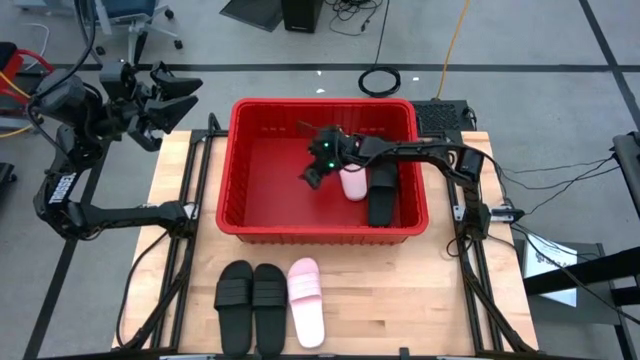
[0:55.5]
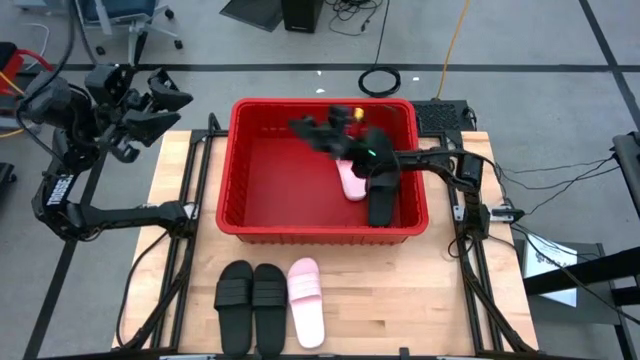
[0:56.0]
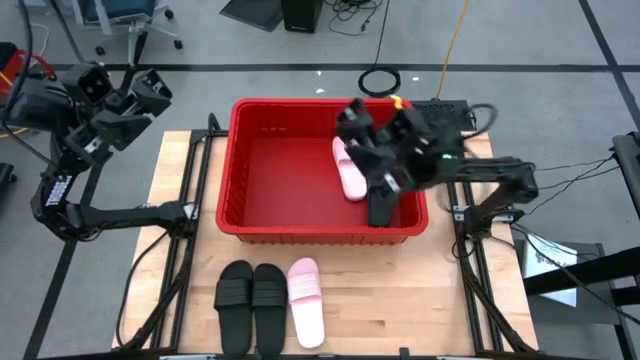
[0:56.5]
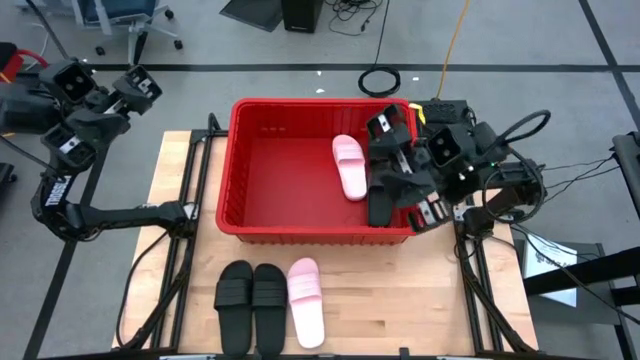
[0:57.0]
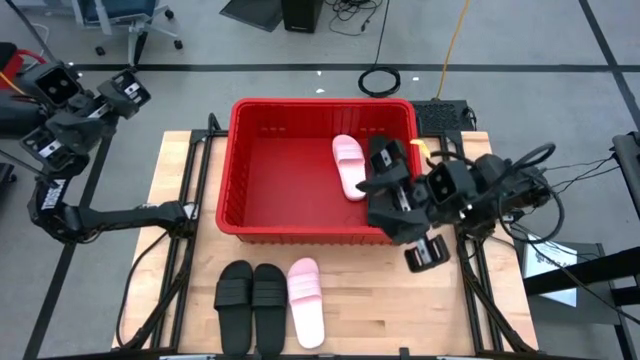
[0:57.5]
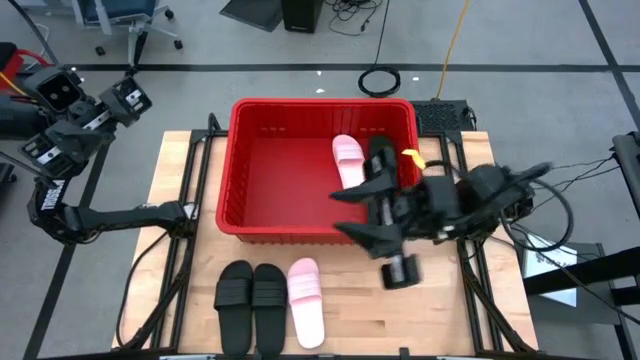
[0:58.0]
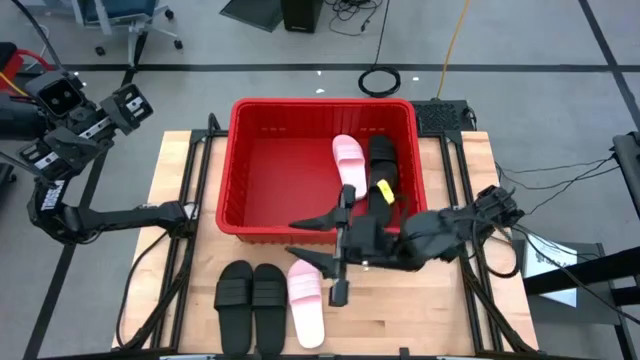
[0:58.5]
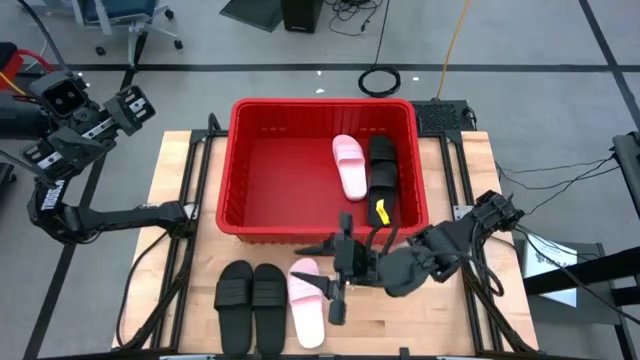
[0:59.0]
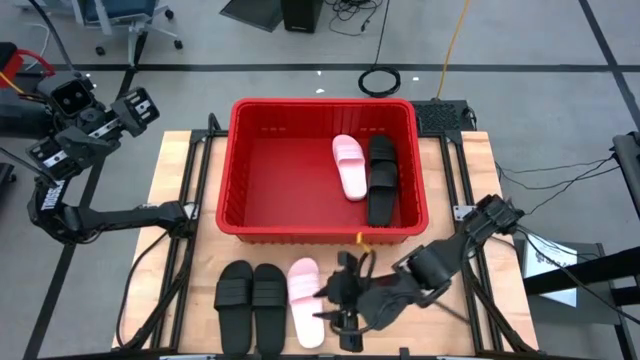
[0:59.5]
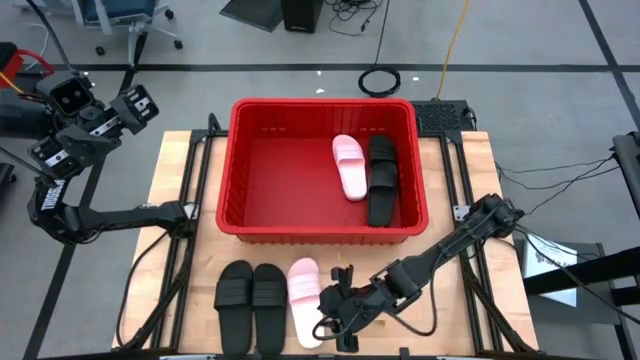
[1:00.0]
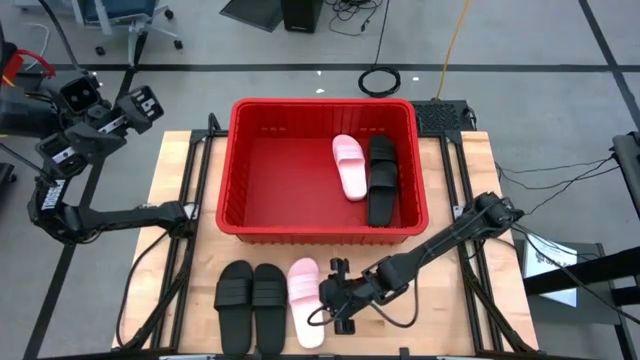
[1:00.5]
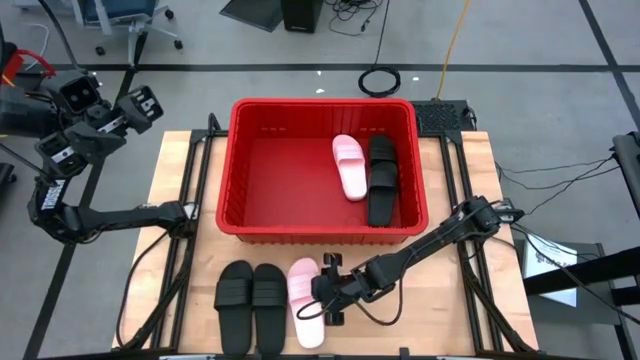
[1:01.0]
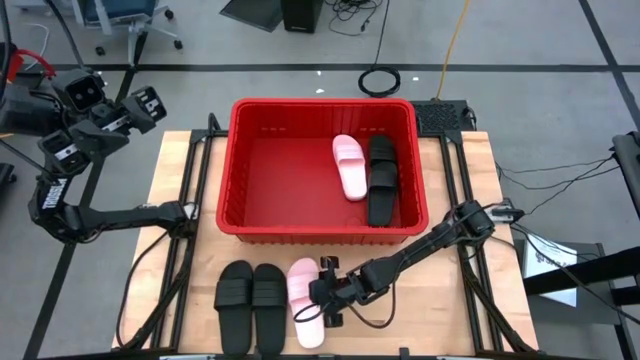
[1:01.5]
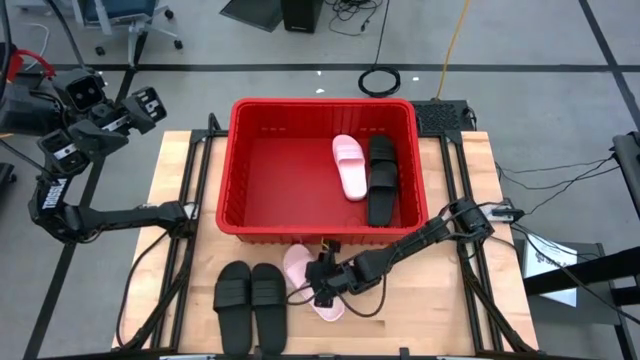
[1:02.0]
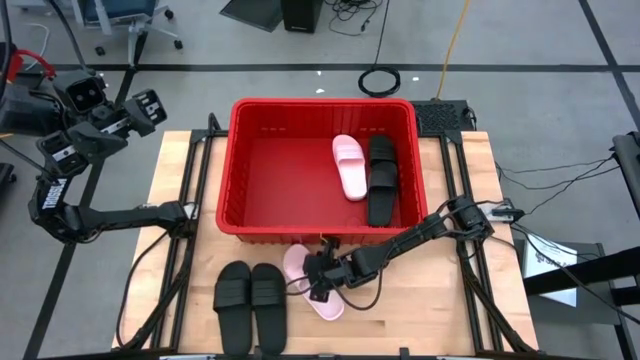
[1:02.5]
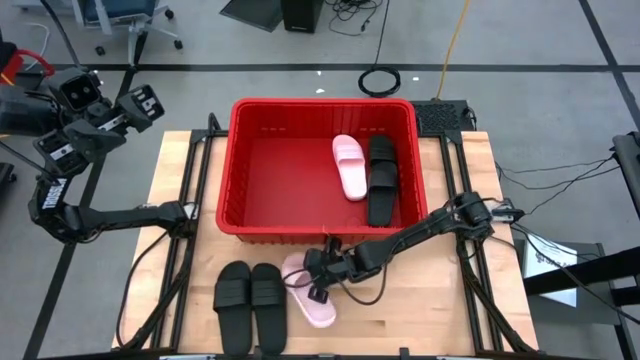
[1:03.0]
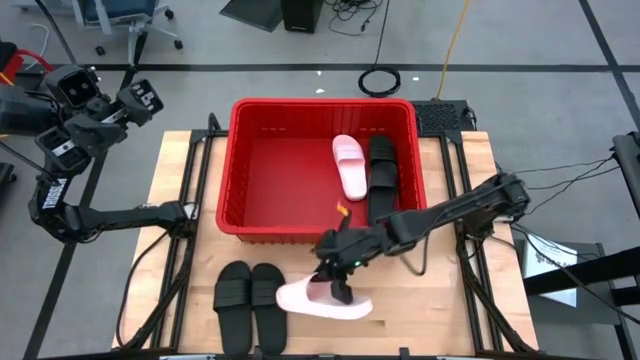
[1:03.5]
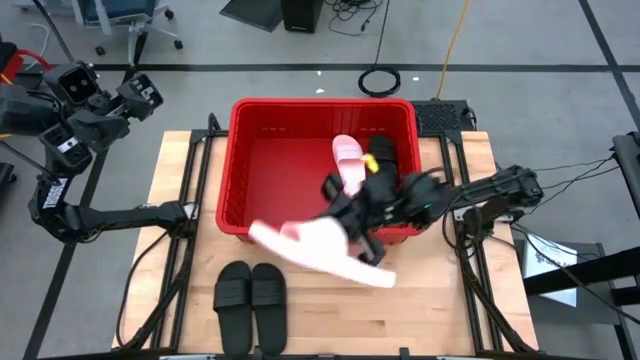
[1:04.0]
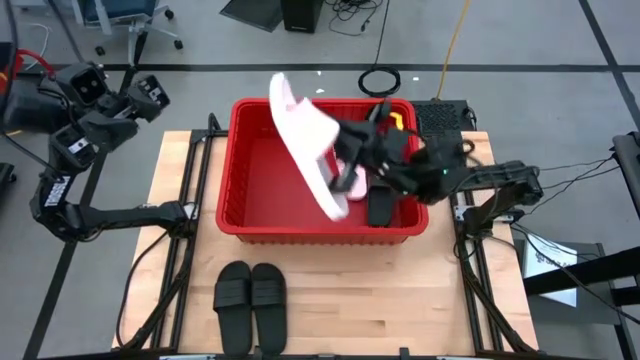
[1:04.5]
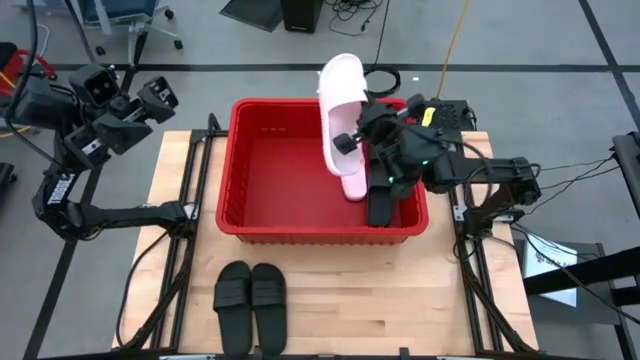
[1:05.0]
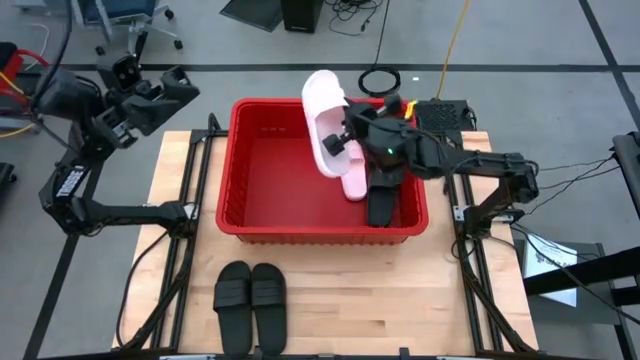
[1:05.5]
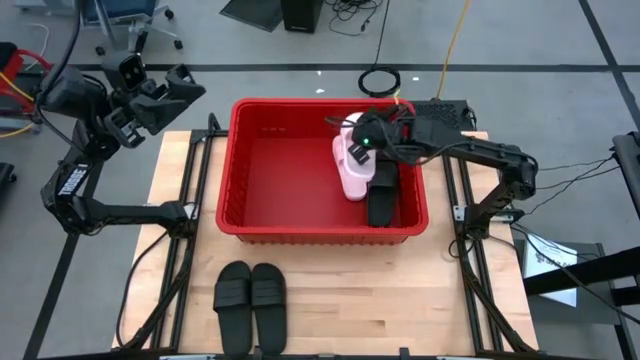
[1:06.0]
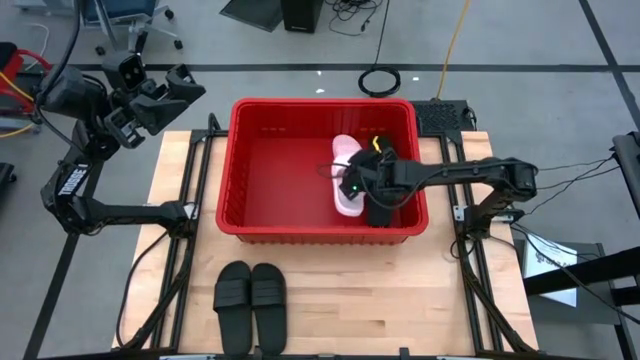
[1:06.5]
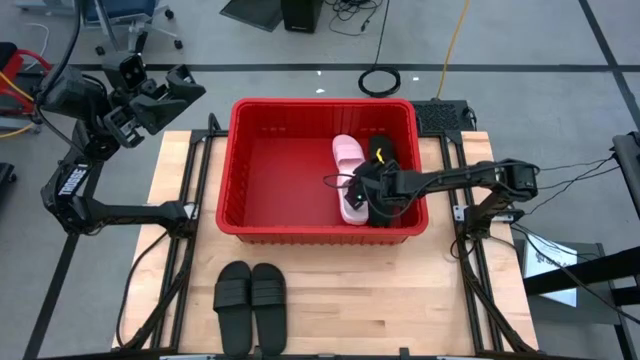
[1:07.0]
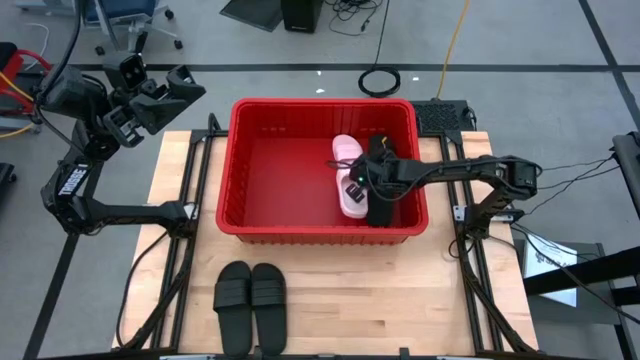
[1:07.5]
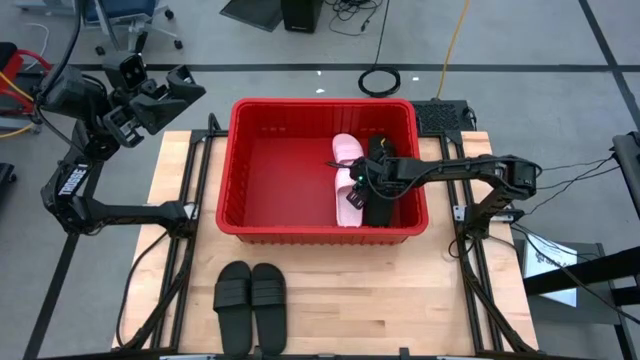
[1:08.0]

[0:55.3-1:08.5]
Task: Pick and place slides into bin
Put the pink slide into the red container

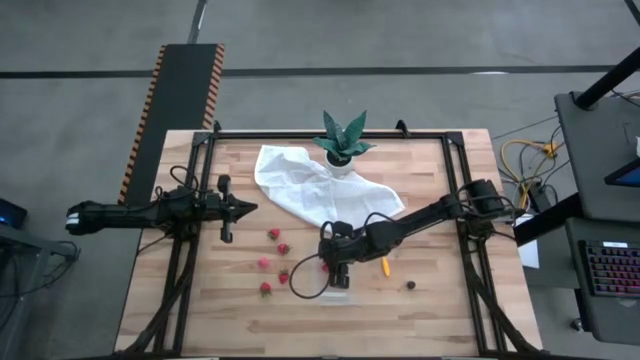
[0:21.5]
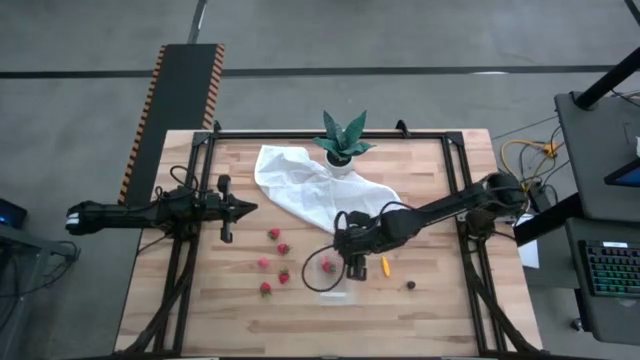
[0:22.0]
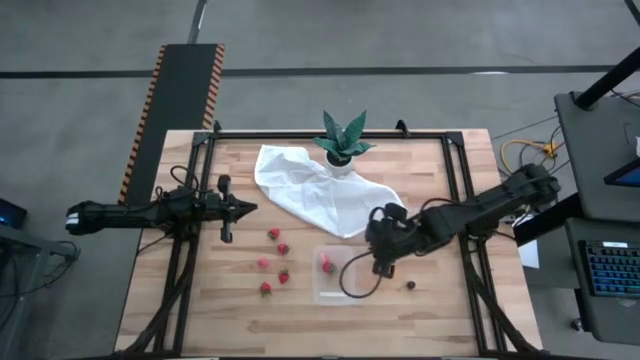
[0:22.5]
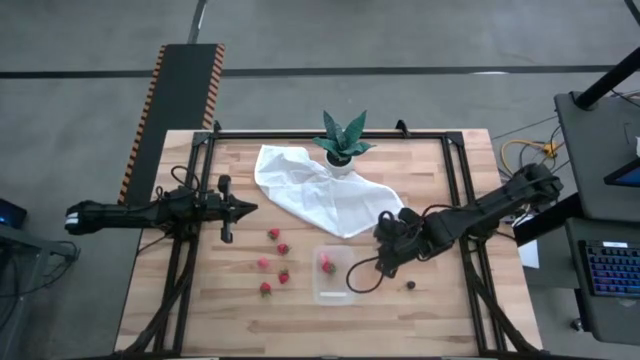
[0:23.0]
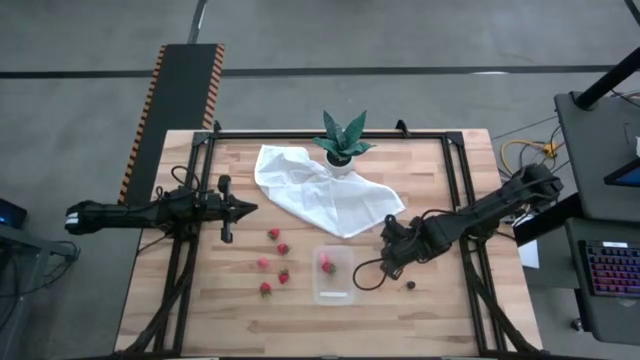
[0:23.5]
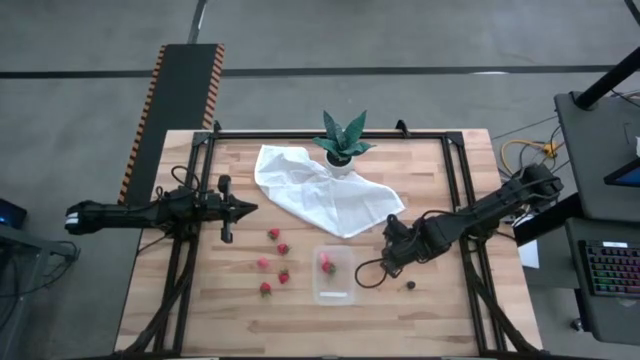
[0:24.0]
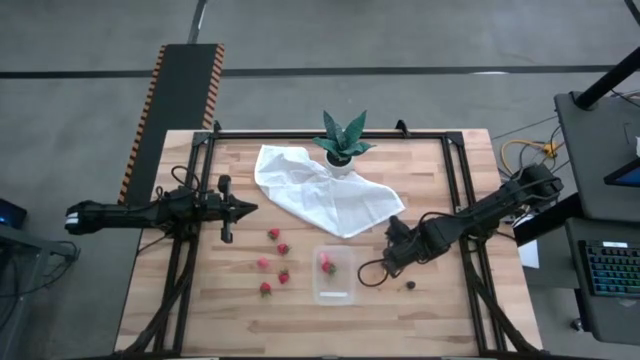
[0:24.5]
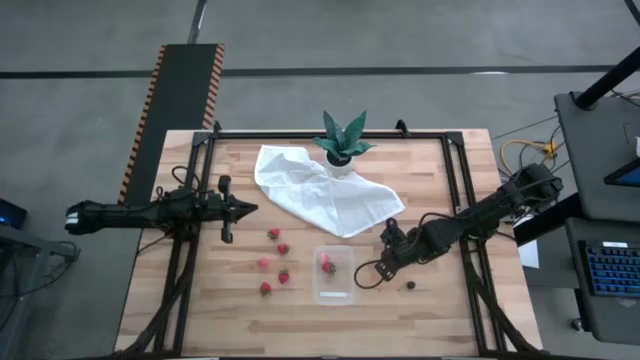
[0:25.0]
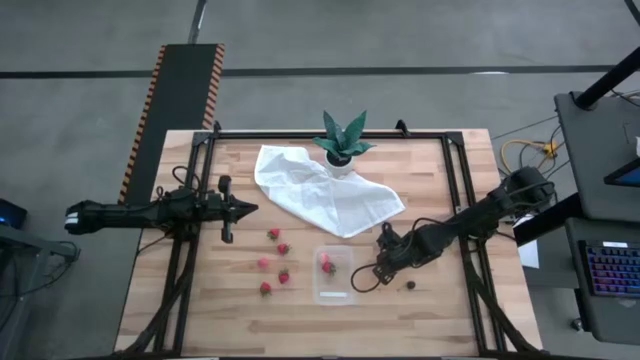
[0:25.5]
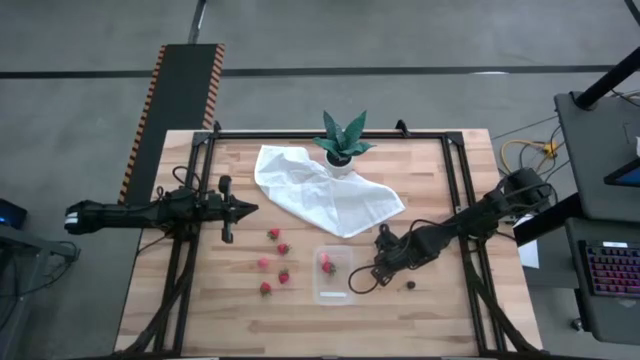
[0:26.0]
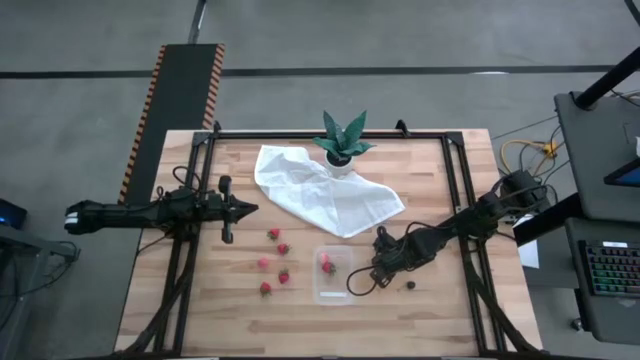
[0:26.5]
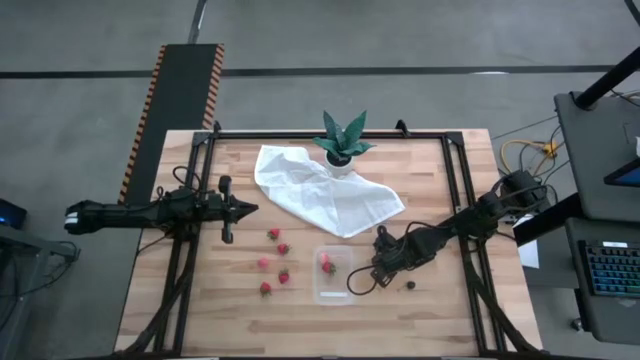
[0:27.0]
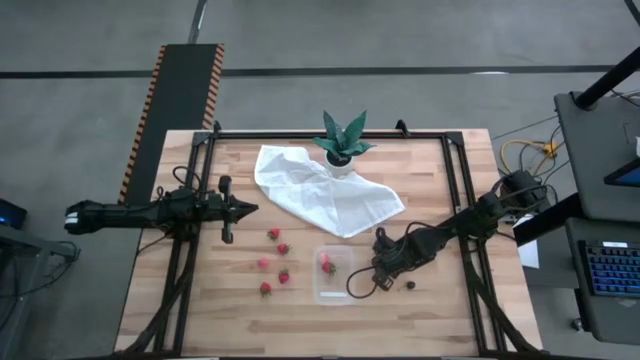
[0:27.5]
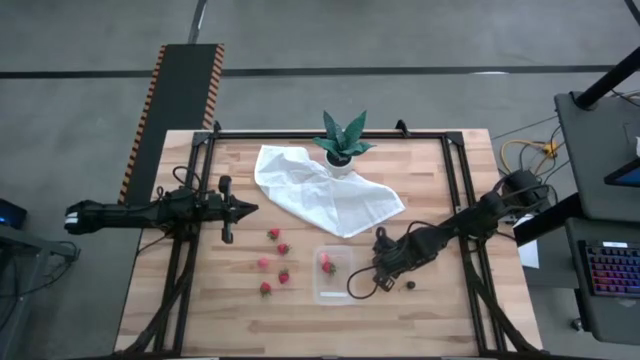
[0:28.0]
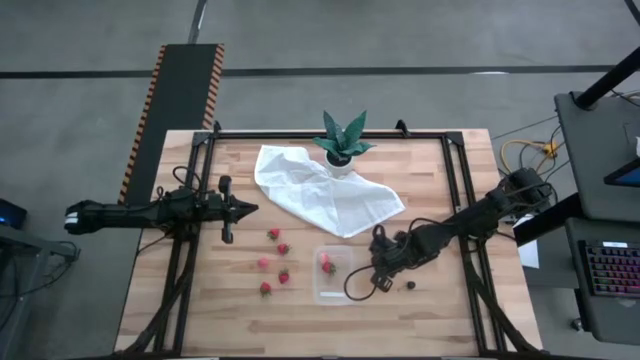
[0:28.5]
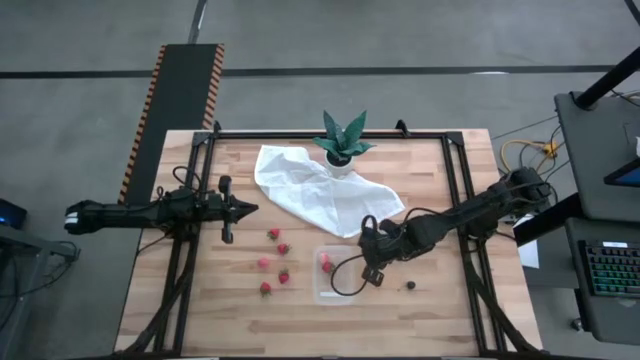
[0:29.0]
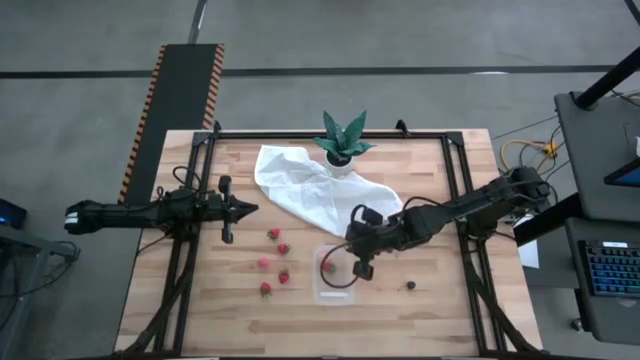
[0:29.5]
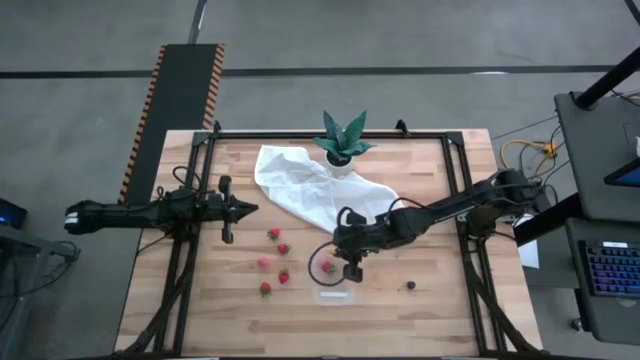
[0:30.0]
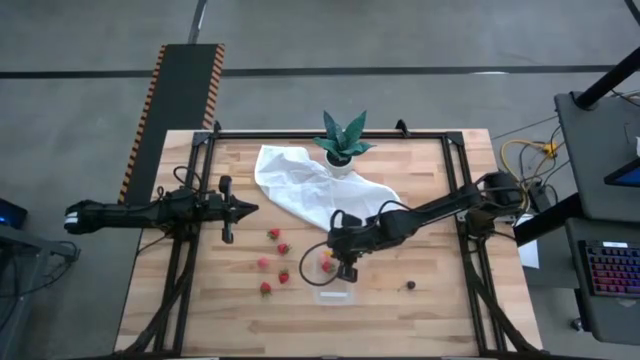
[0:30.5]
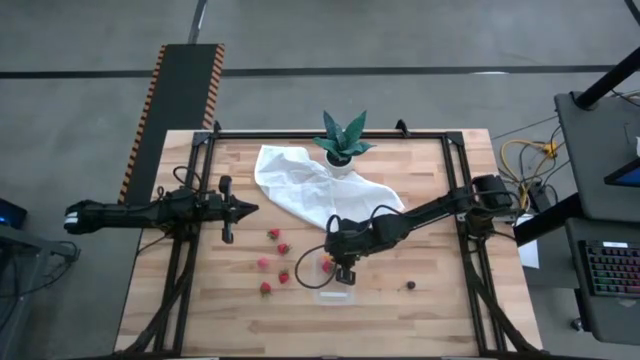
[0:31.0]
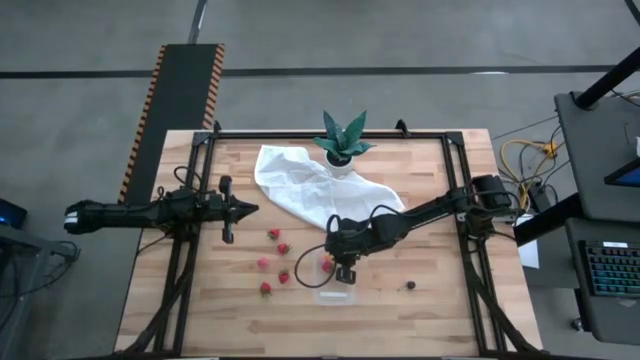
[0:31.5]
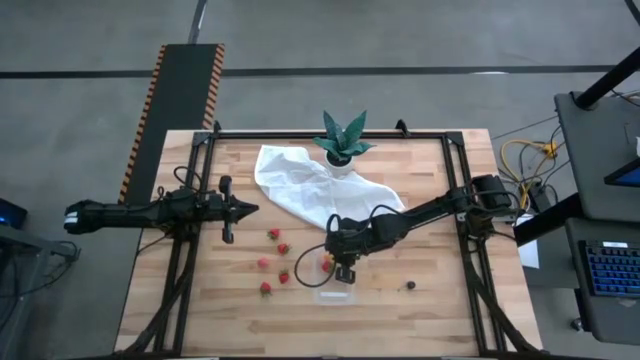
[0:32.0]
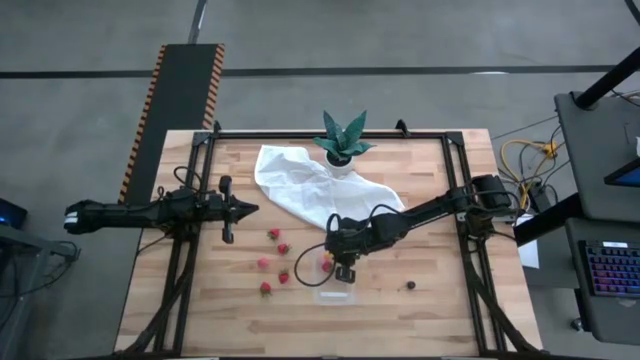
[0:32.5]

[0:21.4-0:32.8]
Task: Pick and placing Produce into tupperware
Put the yellow corn into the transparent bin
